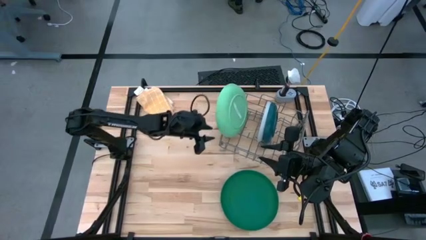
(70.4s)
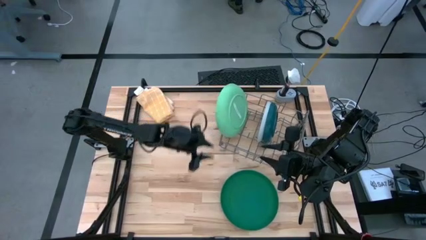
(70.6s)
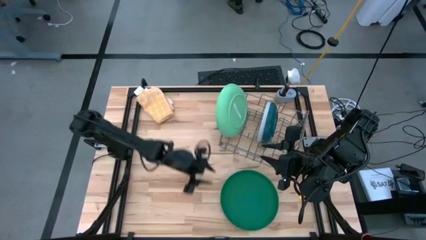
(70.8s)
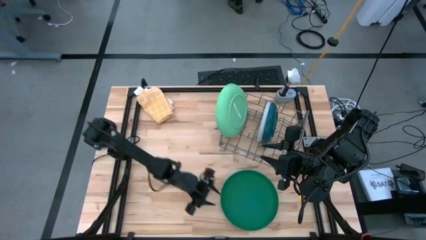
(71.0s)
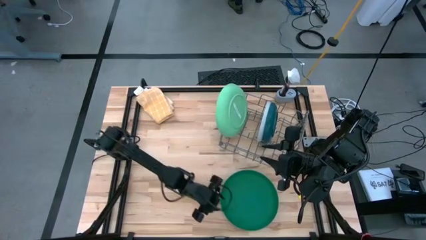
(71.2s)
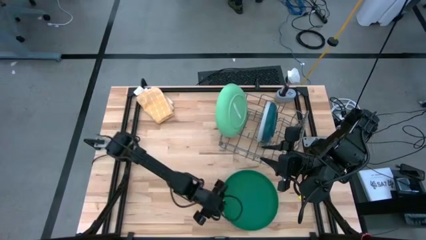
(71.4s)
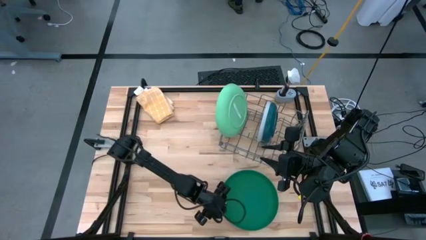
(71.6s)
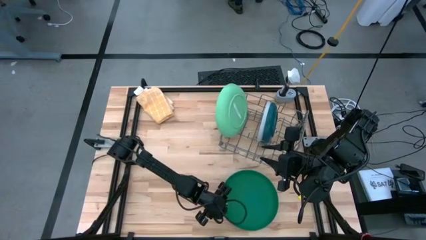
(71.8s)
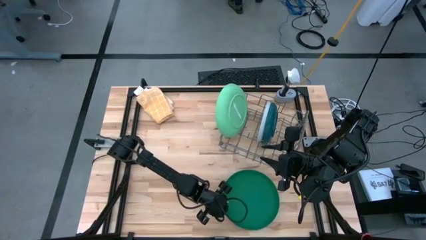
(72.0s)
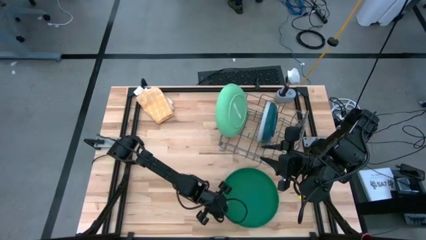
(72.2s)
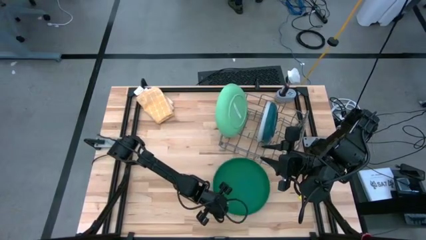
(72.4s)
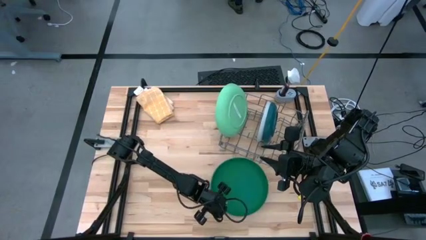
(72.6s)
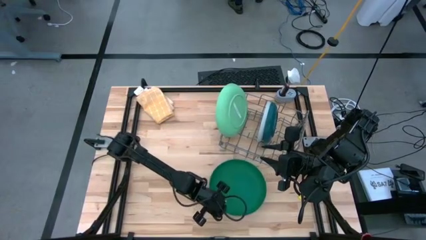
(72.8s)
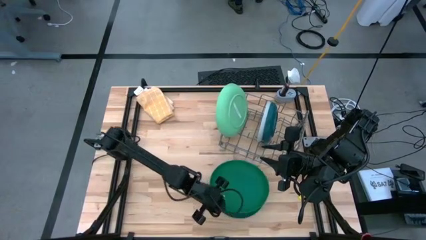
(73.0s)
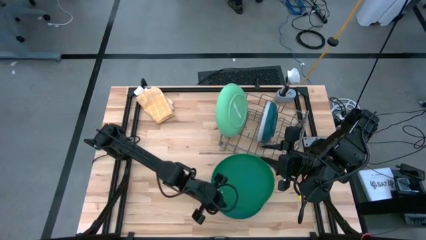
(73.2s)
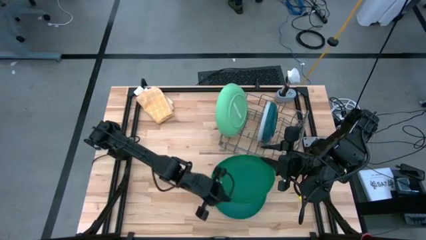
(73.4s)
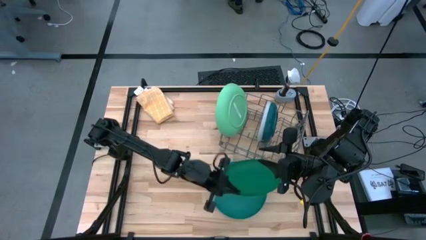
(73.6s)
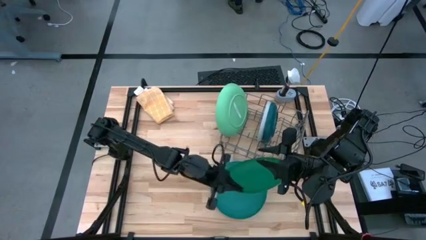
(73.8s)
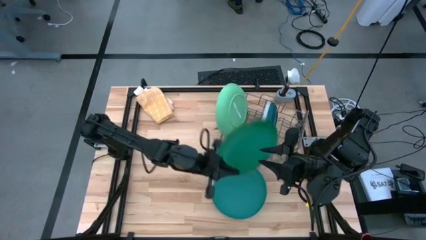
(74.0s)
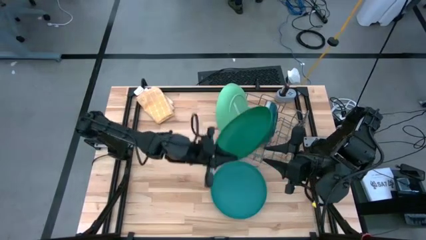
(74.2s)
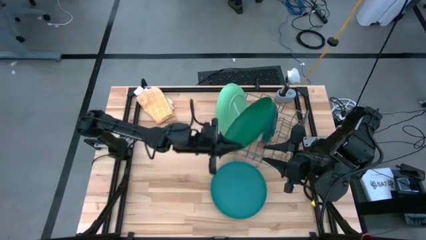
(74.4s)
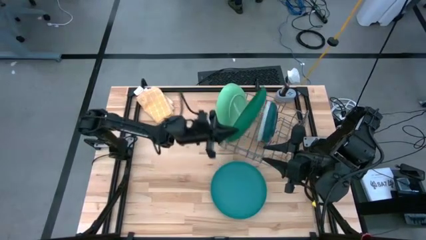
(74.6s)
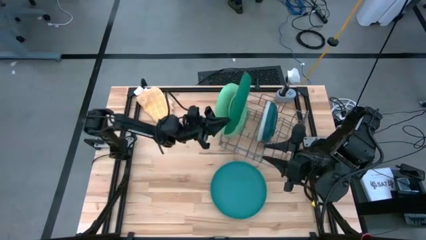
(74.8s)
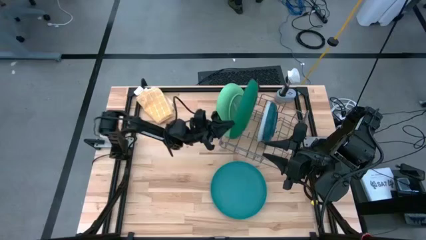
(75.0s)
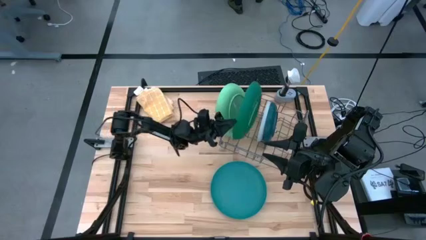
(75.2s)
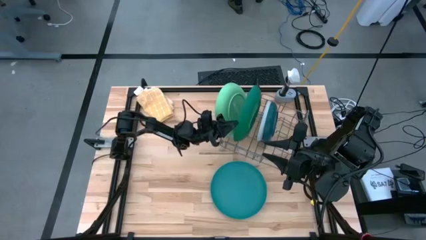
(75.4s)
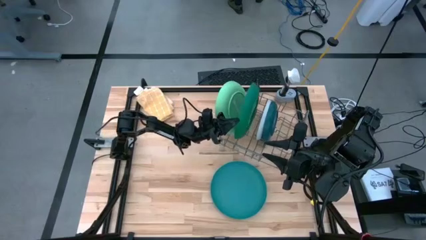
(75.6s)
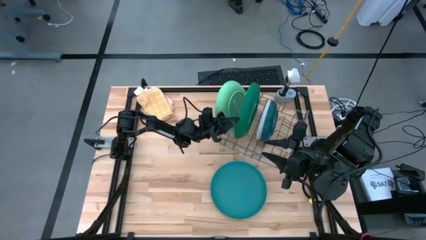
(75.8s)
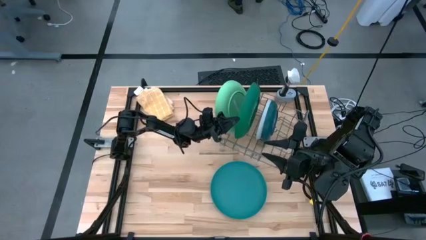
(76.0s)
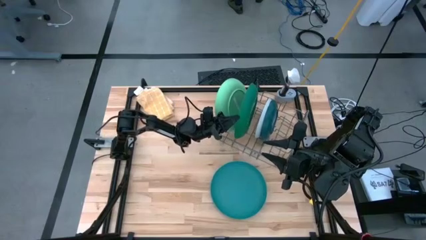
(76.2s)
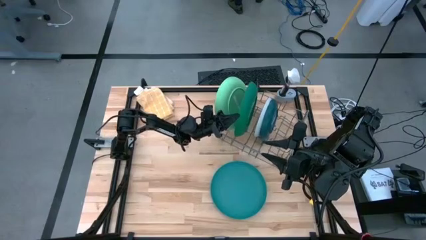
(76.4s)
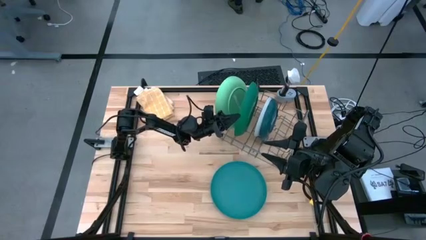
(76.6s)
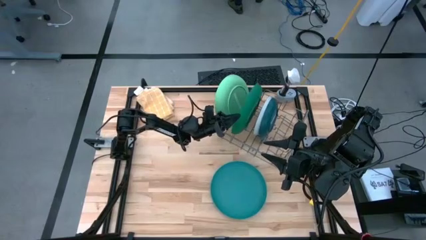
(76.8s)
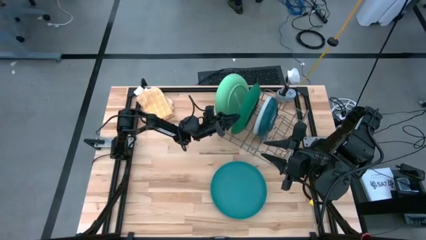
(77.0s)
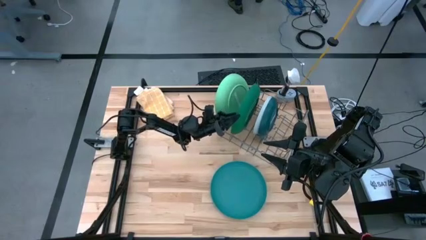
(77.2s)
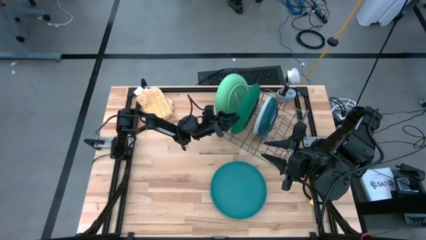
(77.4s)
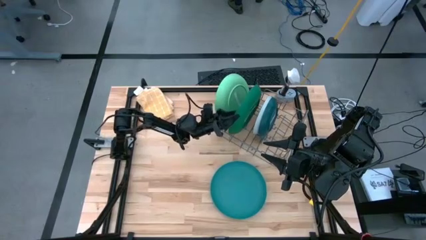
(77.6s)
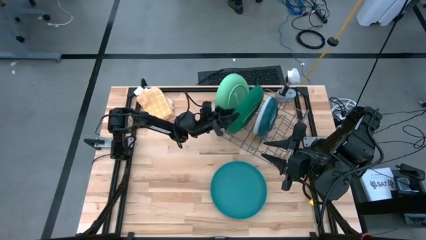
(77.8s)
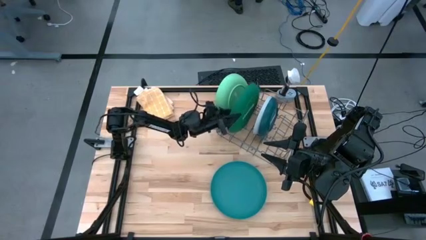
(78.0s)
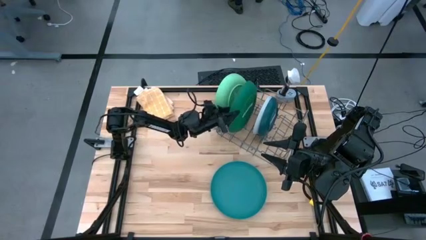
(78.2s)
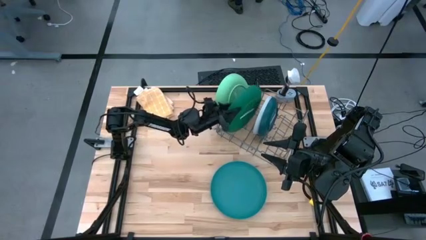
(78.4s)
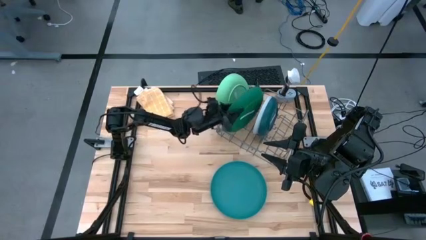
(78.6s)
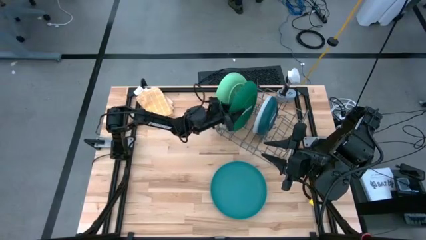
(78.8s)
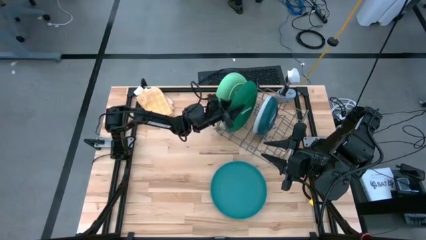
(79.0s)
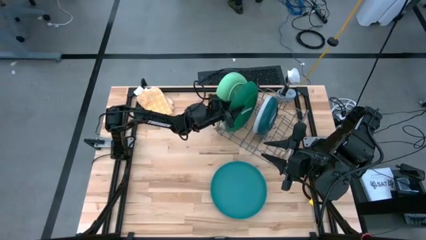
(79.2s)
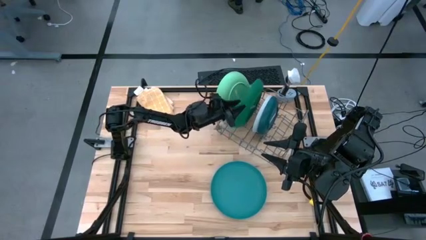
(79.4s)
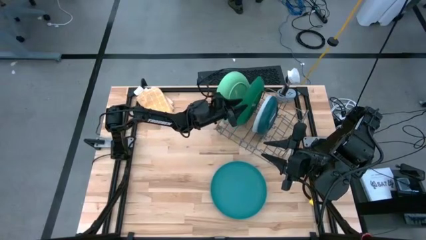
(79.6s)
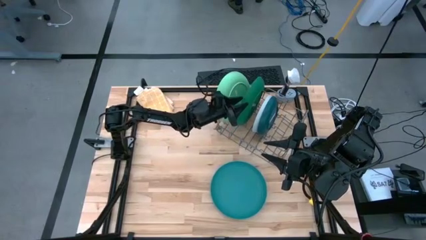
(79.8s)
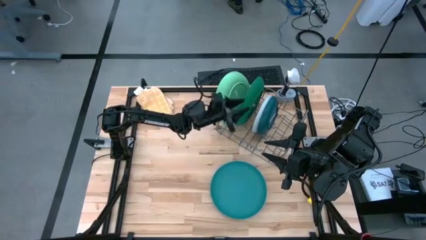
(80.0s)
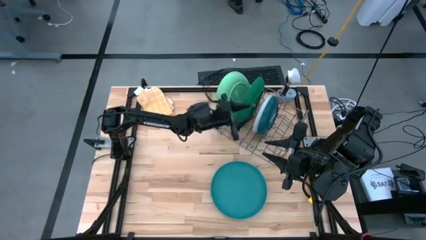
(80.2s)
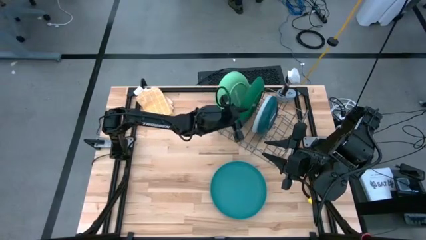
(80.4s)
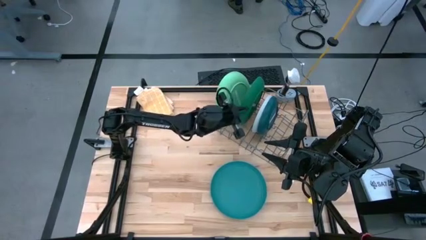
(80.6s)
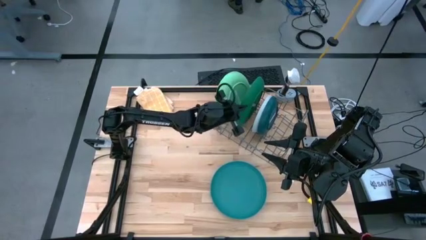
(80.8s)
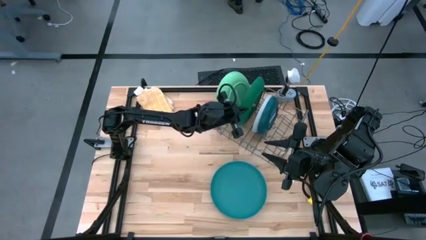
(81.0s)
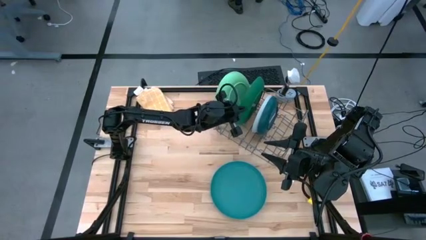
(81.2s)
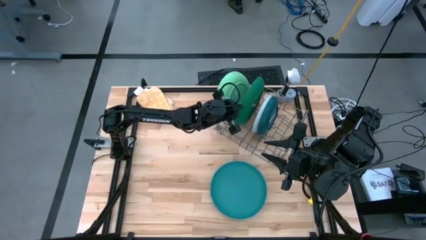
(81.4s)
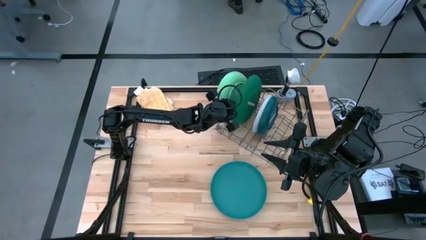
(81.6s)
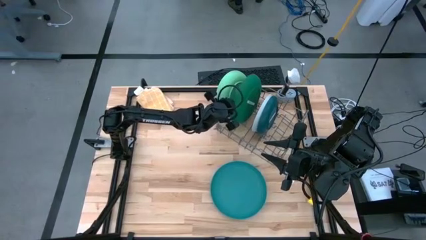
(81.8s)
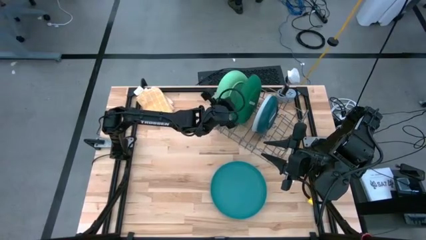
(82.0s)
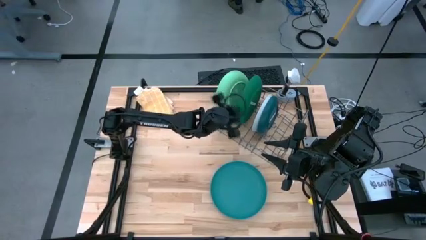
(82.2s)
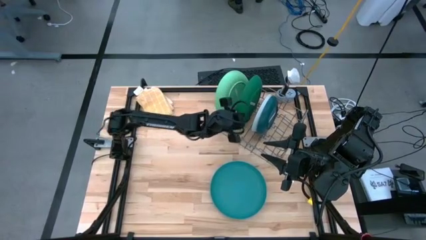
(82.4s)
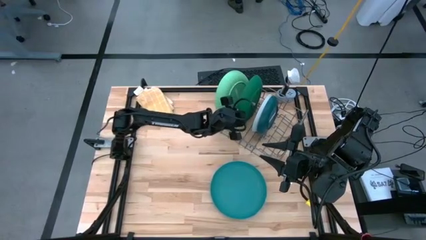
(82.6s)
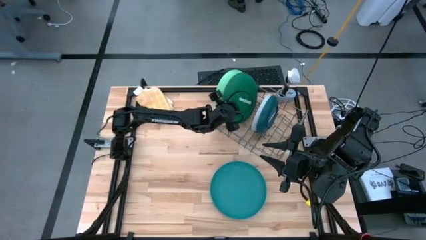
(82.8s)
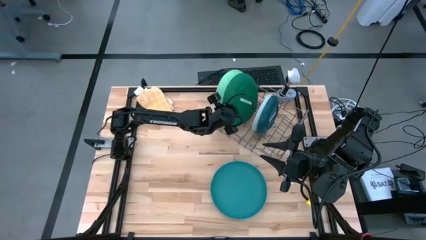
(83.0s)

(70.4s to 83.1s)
Task: Sort dishes
Put the green plate in the dish rack

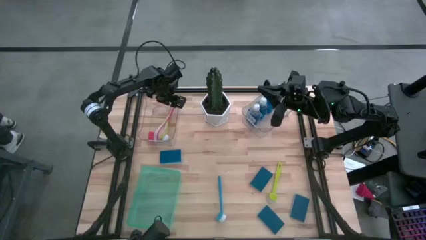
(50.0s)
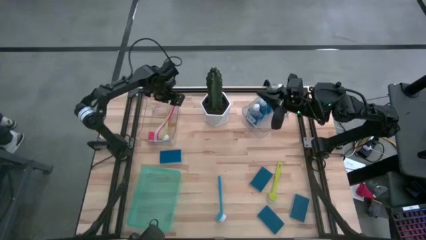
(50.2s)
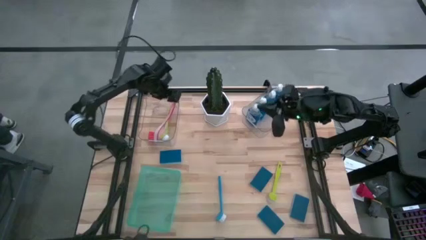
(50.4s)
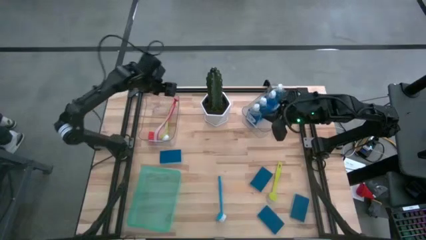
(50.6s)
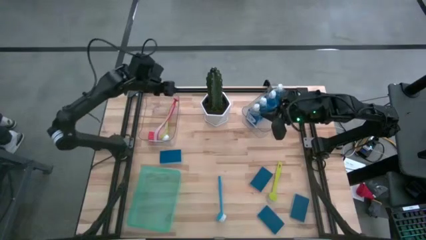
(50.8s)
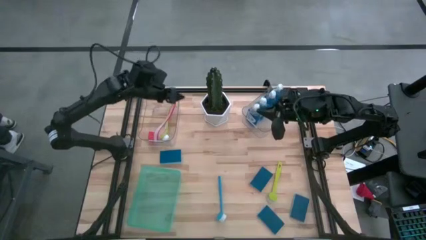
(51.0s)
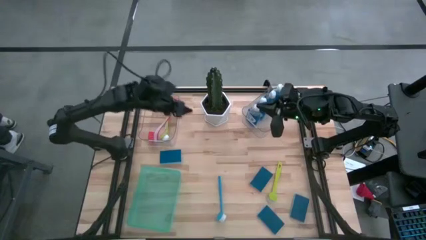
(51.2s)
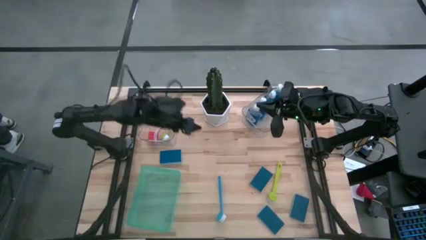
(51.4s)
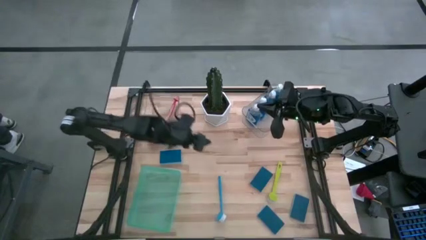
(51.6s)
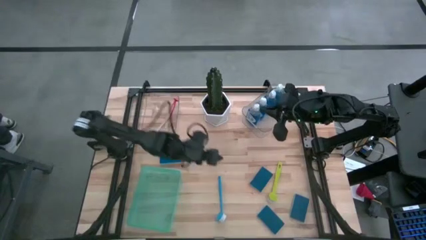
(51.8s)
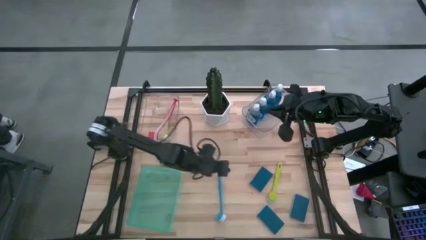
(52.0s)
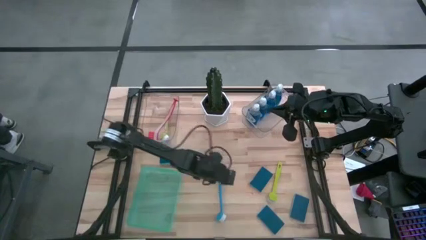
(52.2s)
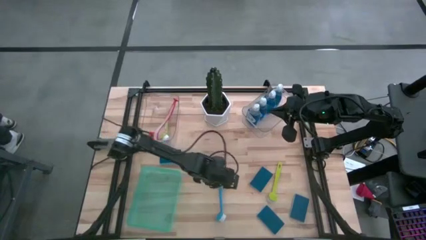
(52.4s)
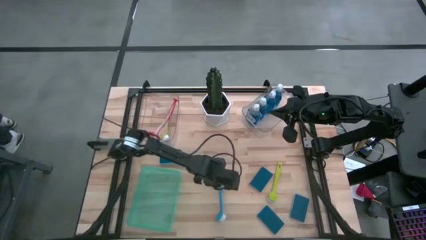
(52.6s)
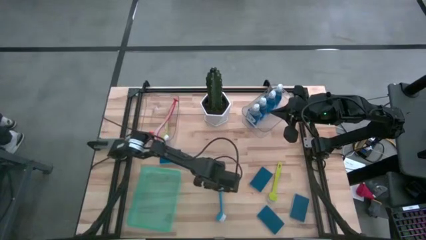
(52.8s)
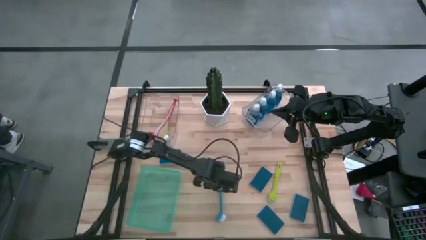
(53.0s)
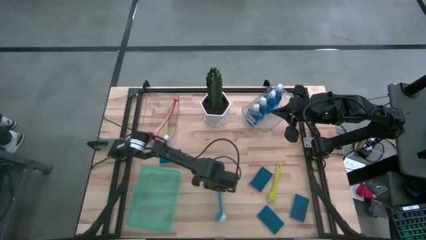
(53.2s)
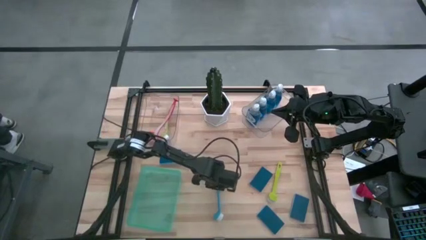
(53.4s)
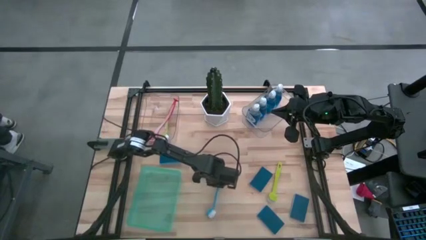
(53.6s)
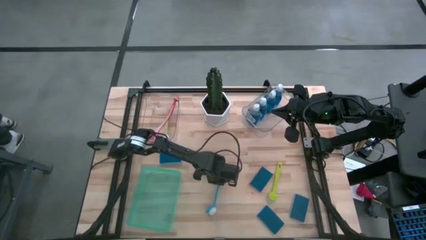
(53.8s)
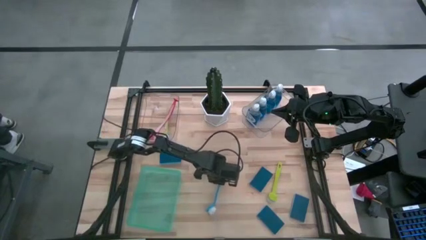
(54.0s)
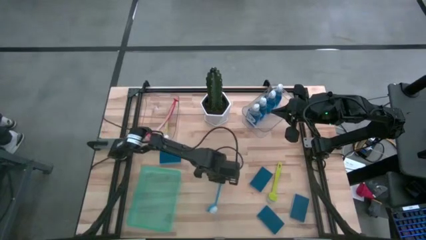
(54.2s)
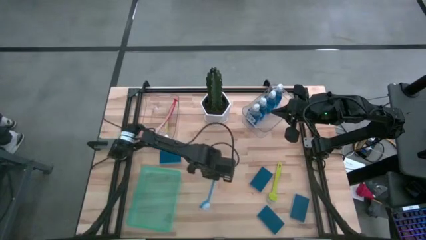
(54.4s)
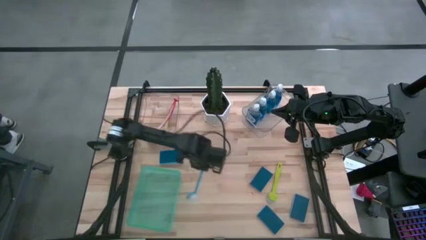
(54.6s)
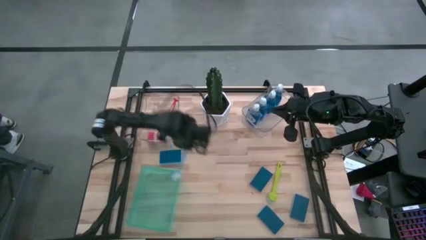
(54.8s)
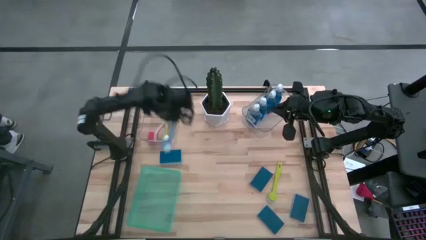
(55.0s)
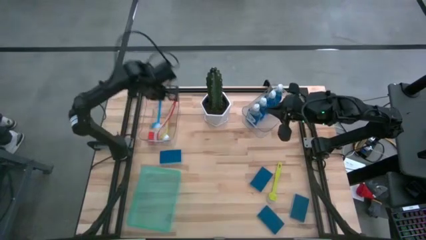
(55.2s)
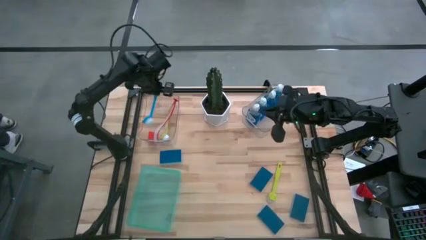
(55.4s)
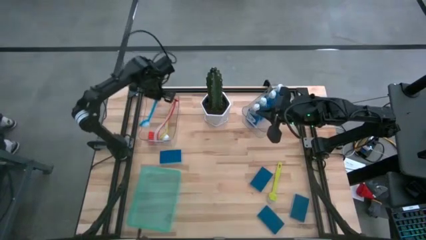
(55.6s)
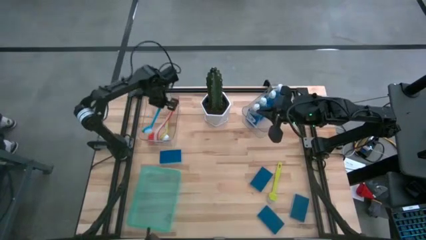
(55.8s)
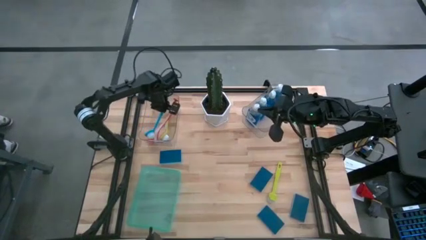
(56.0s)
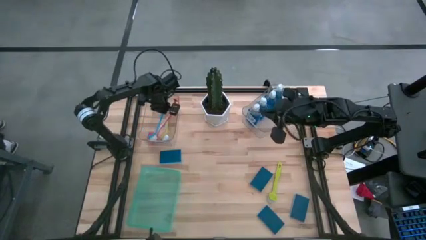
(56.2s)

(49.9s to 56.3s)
Task: Pick & Place Kitchen Sink Supplies
Put the blue dish brush into the left transparent bin
